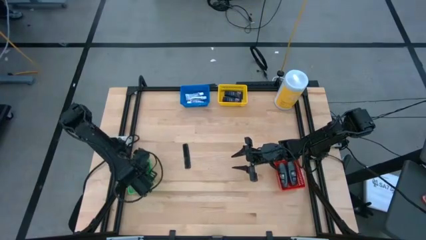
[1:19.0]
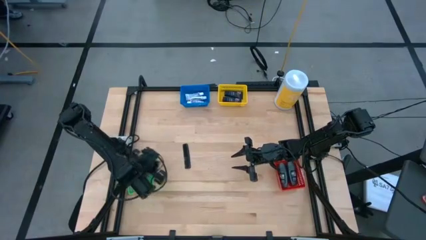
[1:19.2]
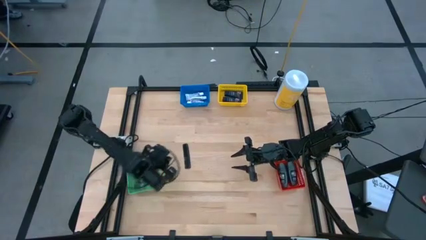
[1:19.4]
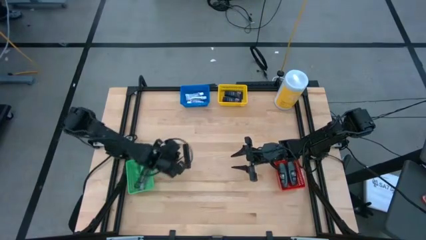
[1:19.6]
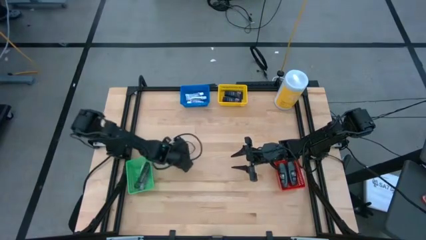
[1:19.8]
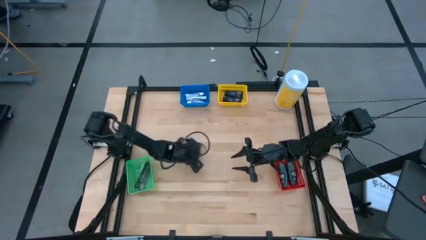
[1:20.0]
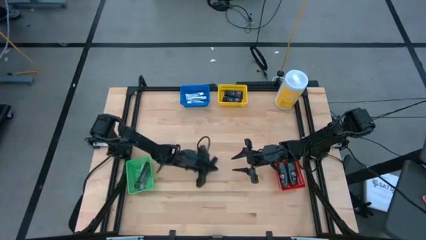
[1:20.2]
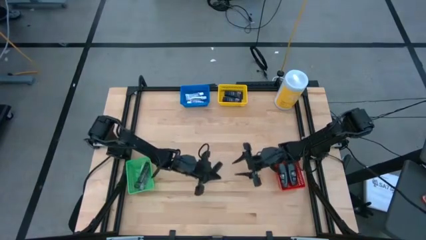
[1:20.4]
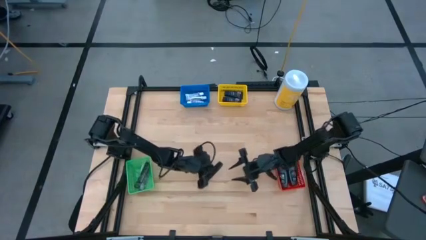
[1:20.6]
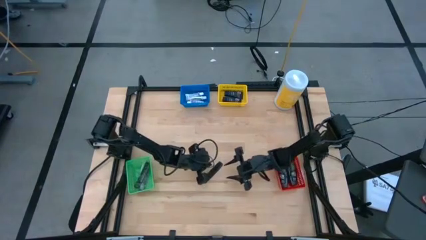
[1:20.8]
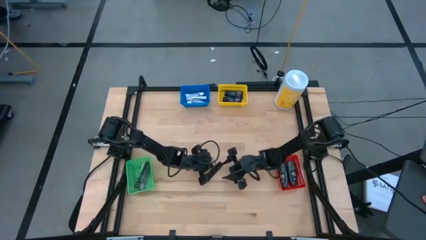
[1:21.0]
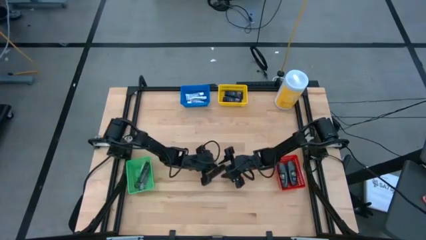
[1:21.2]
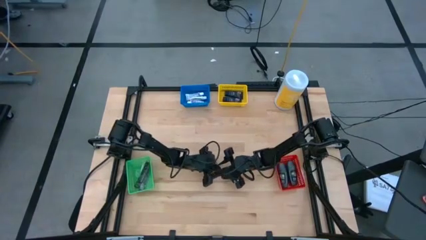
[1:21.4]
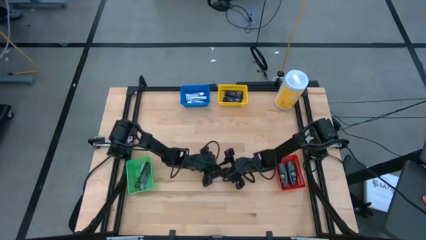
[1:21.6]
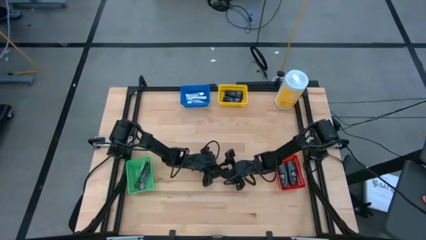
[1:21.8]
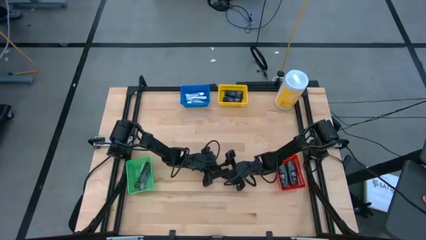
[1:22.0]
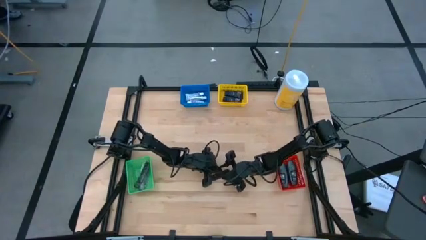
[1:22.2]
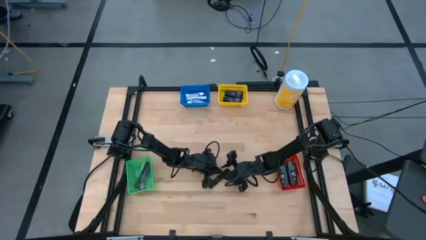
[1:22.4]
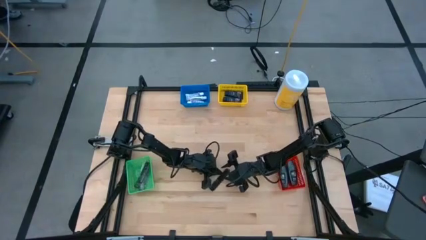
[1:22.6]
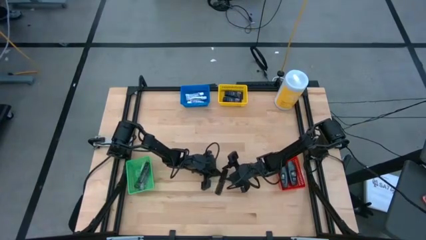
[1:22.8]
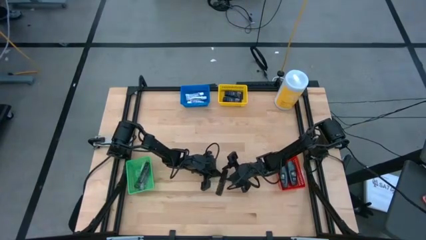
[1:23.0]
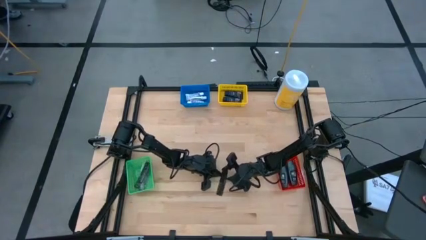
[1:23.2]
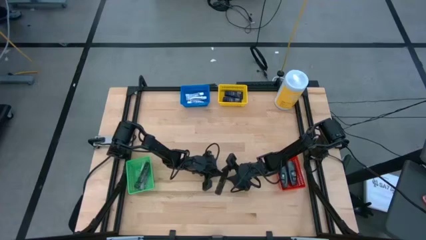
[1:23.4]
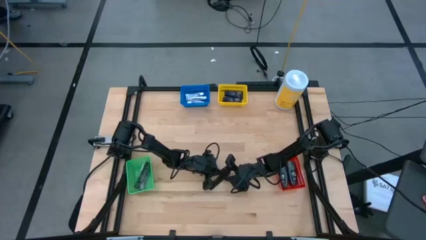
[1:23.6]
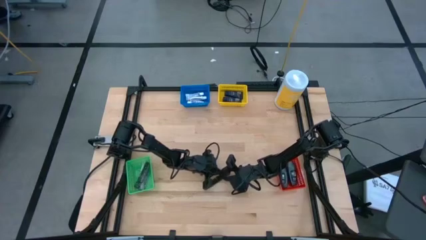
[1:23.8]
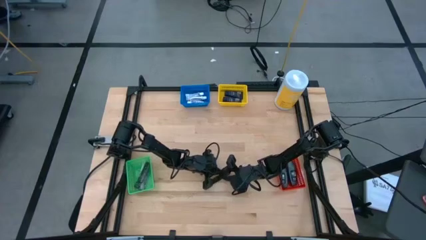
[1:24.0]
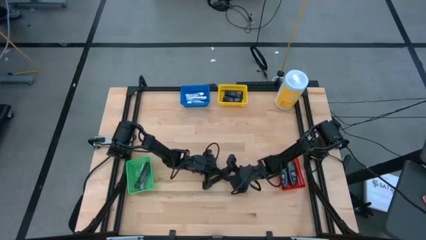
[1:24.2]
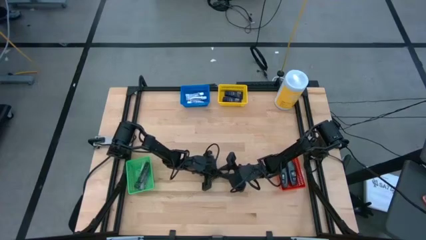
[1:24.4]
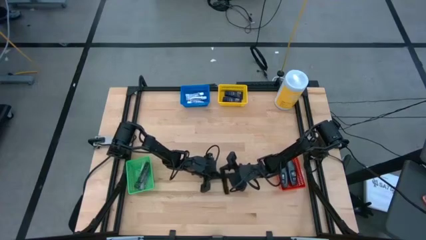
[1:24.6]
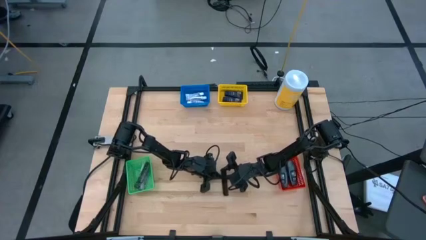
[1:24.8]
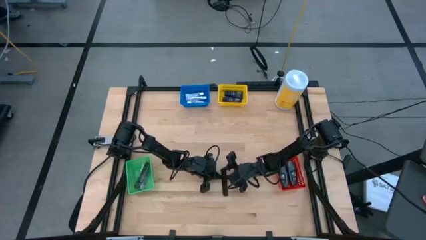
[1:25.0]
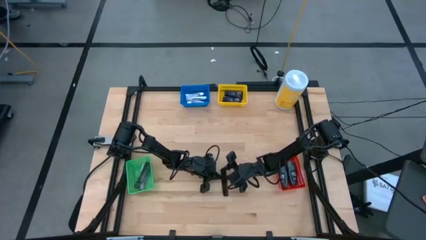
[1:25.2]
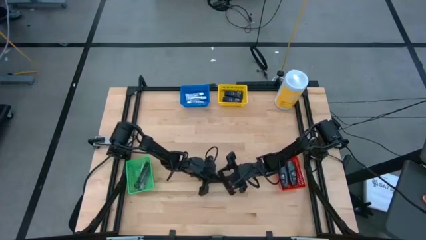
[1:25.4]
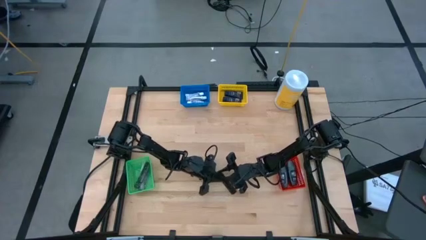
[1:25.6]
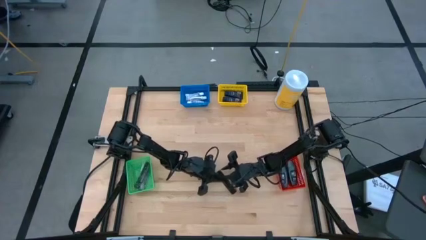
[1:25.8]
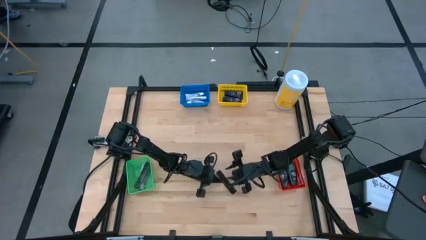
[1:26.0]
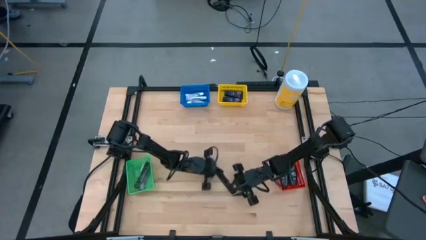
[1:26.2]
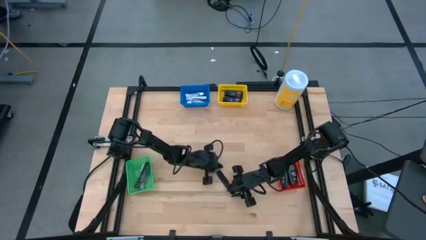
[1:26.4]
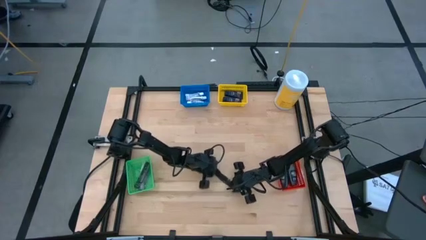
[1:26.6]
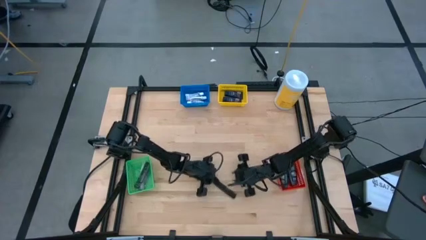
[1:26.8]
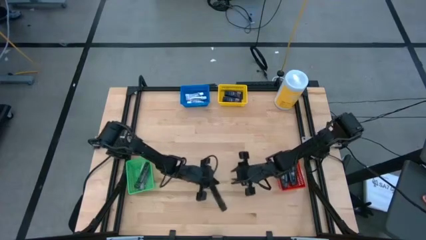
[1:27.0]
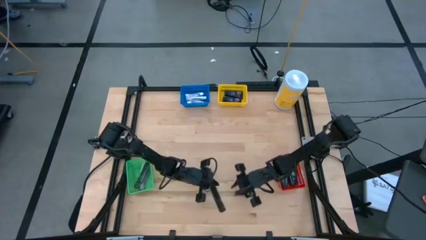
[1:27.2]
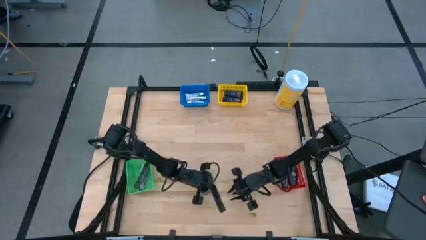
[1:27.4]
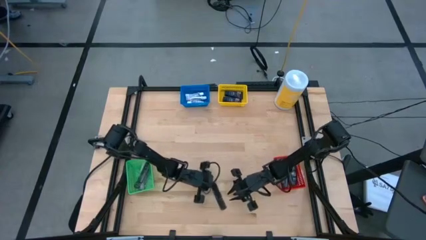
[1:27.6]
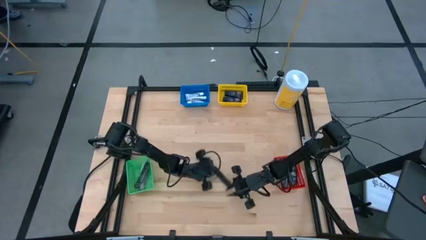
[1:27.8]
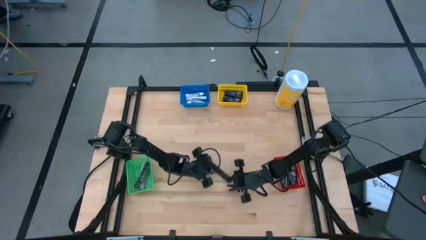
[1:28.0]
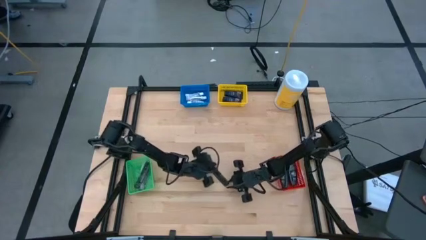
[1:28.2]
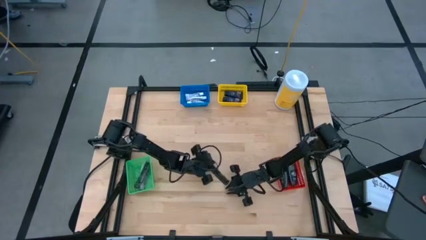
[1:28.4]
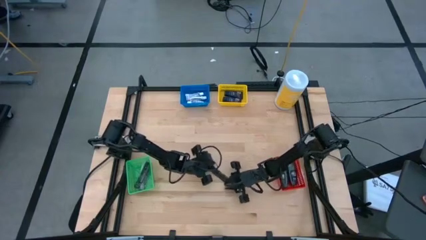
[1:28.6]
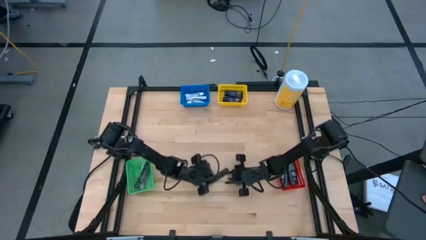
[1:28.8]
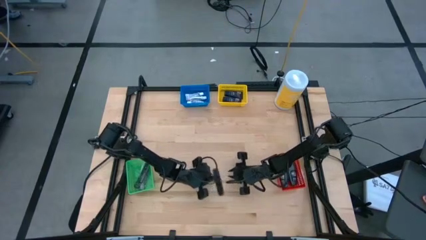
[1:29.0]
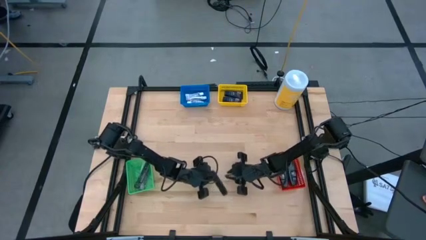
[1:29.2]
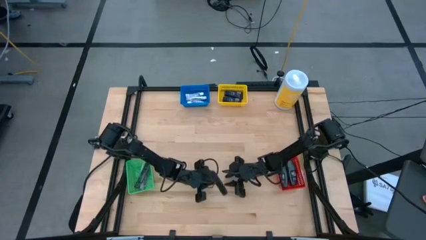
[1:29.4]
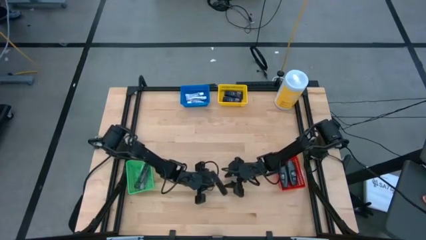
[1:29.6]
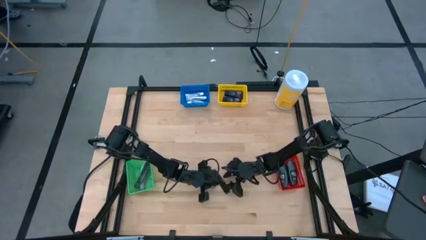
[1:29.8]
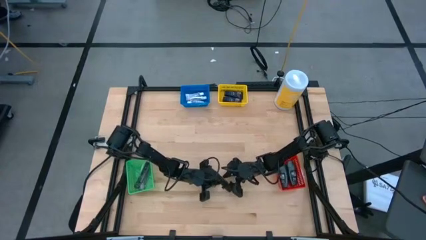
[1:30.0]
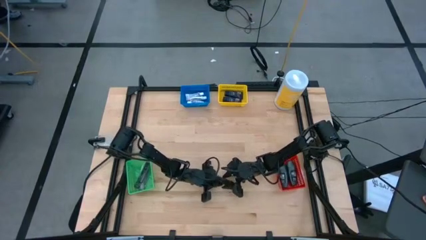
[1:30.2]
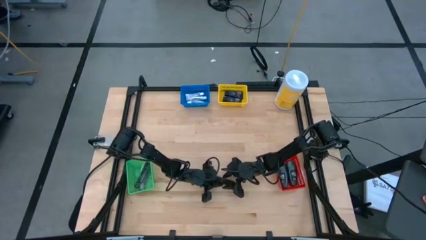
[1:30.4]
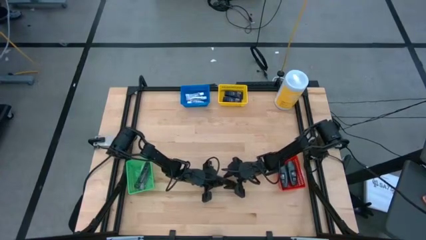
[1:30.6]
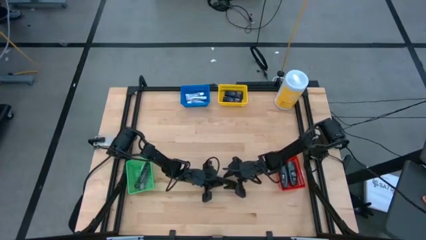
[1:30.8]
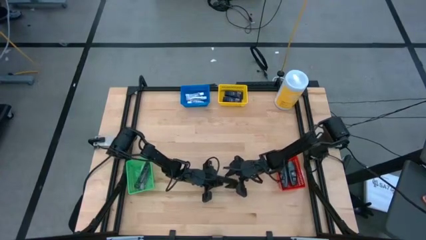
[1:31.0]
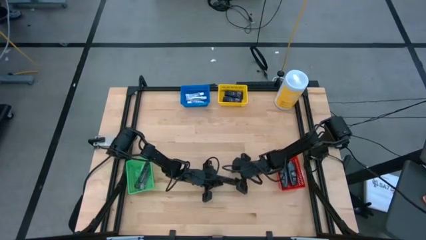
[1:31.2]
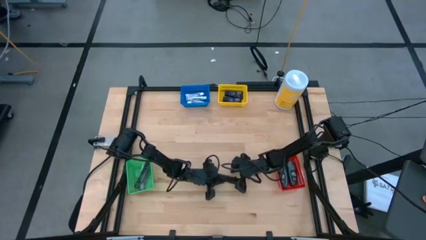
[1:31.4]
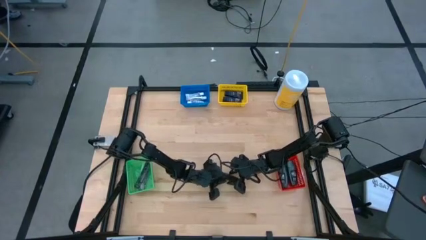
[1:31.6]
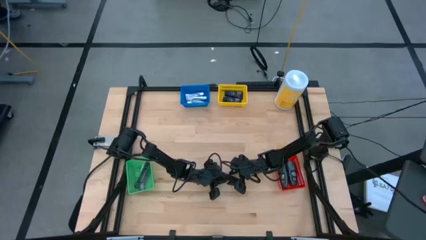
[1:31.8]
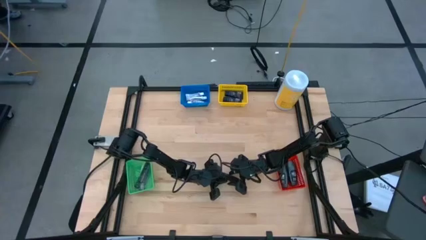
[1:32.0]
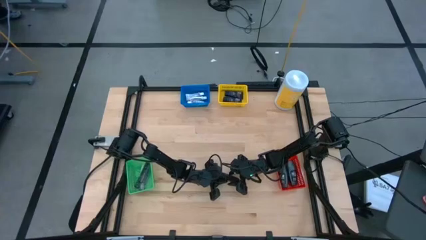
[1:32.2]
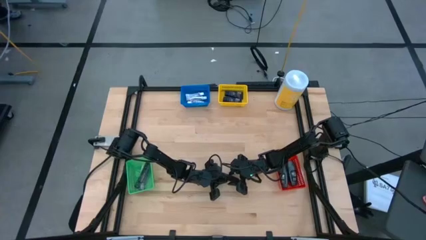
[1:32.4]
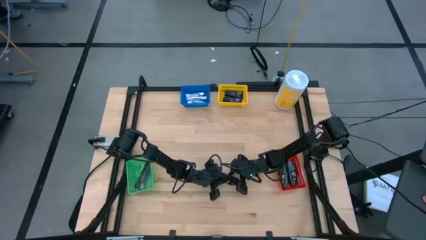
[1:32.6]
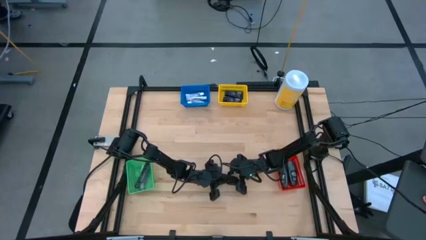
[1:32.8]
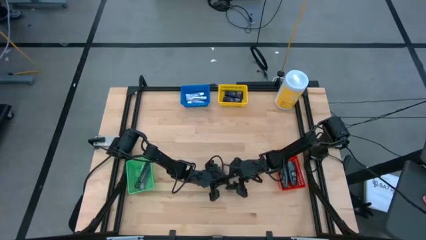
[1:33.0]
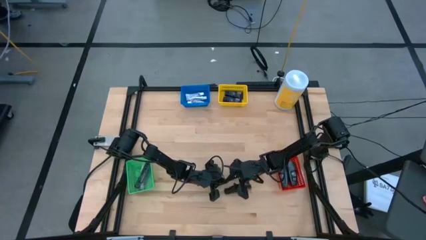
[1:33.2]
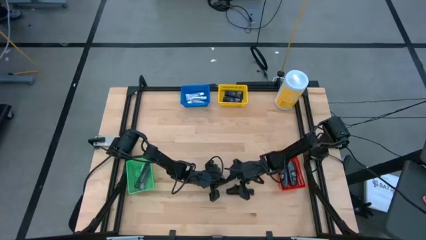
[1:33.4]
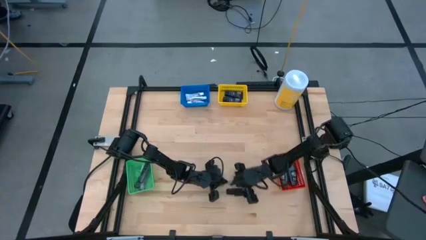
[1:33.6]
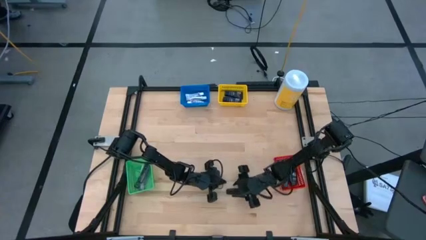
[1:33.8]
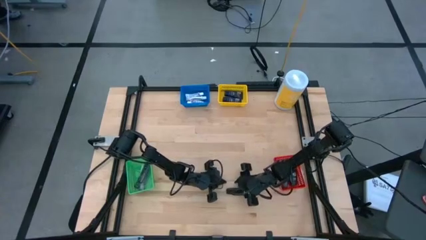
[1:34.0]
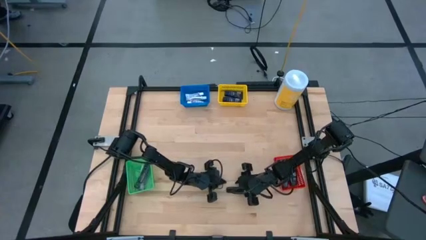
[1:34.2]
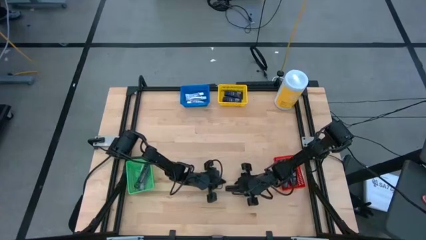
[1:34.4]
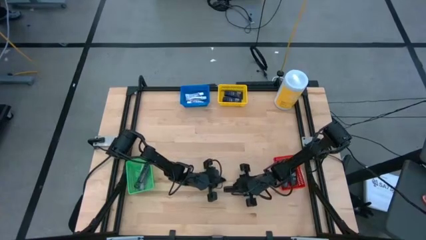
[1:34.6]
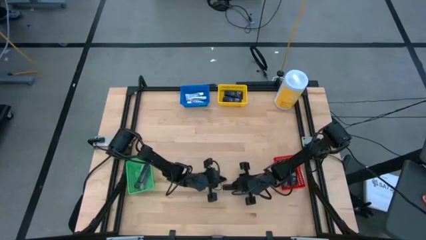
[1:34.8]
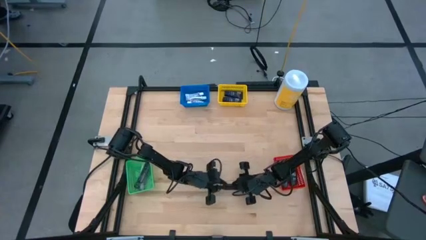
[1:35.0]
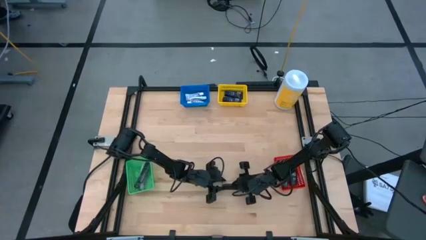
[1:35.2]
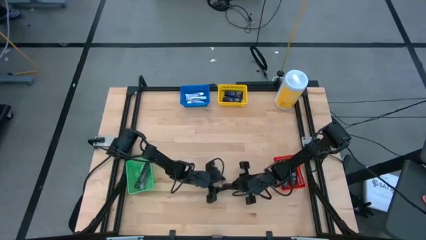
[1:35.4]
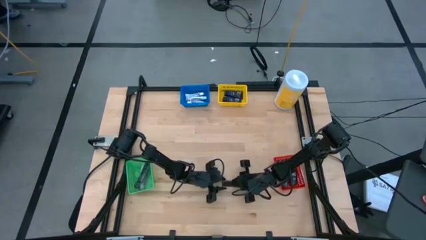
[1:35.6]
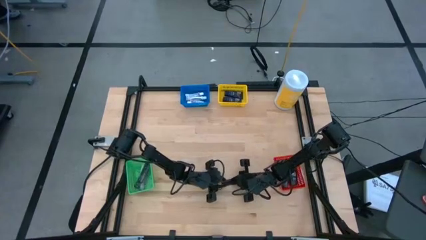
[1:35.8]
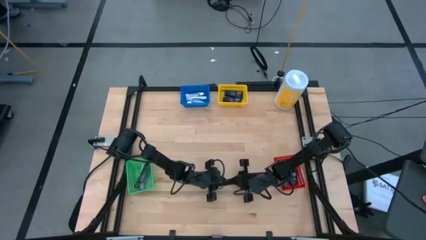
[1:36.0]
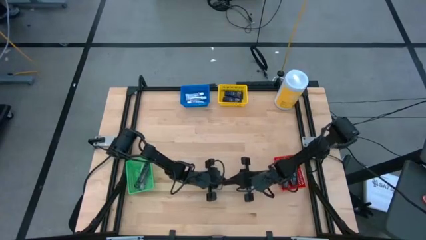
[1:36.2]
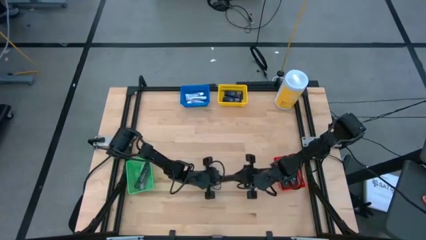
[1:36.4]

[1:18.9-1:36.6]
Task: Pick & Place Travel size toiletries
Put the black hair comb into the green bin
